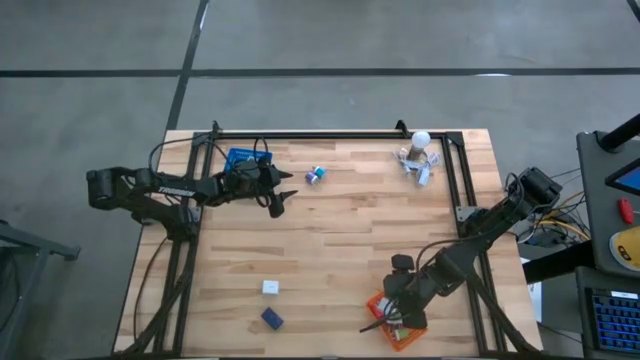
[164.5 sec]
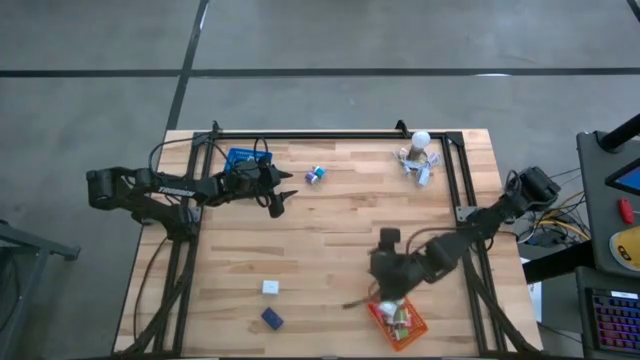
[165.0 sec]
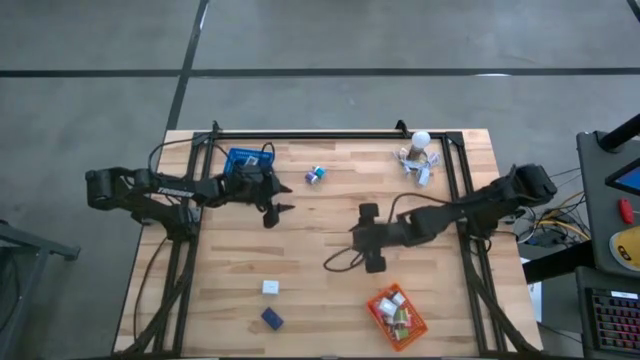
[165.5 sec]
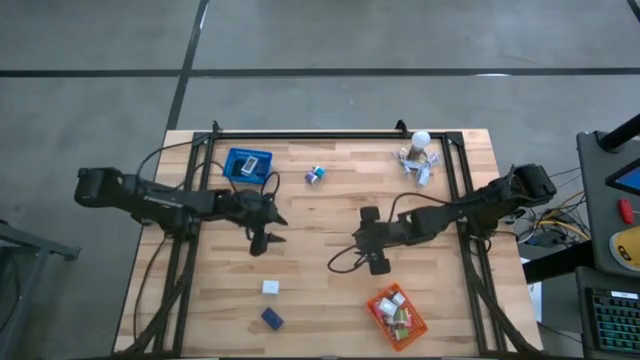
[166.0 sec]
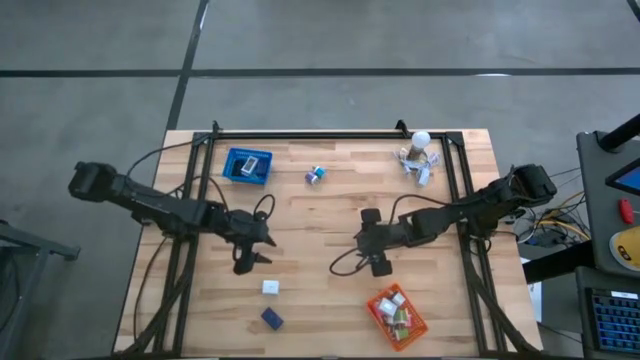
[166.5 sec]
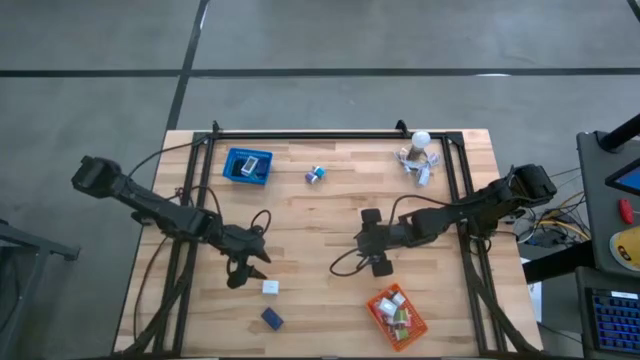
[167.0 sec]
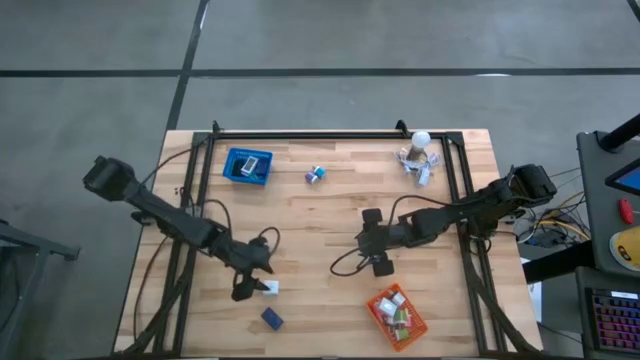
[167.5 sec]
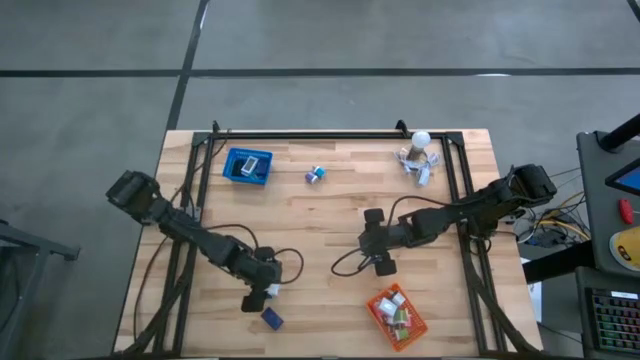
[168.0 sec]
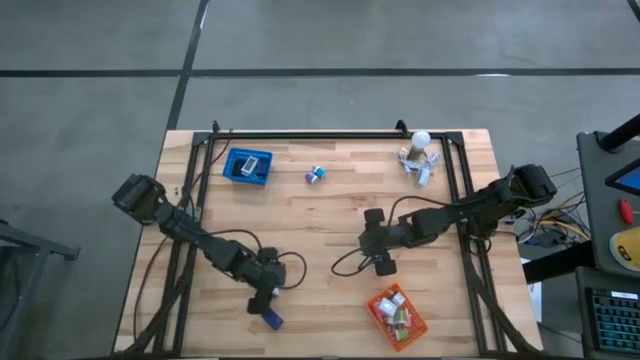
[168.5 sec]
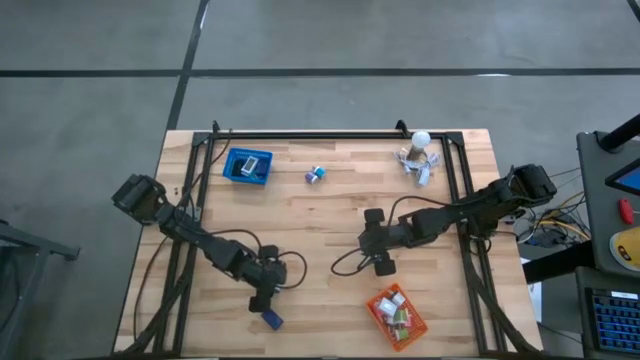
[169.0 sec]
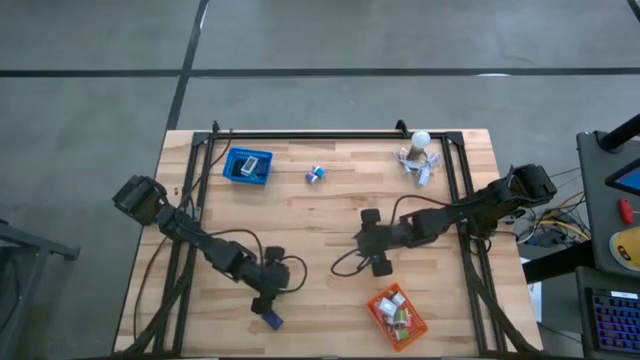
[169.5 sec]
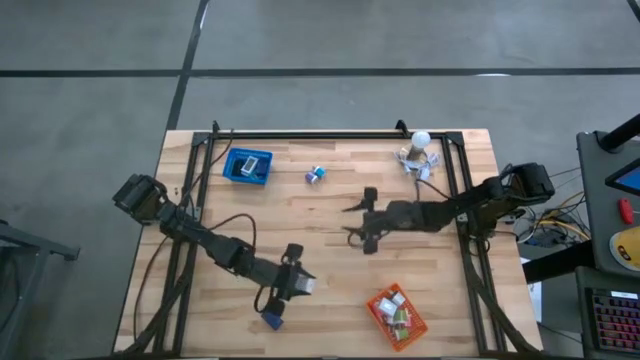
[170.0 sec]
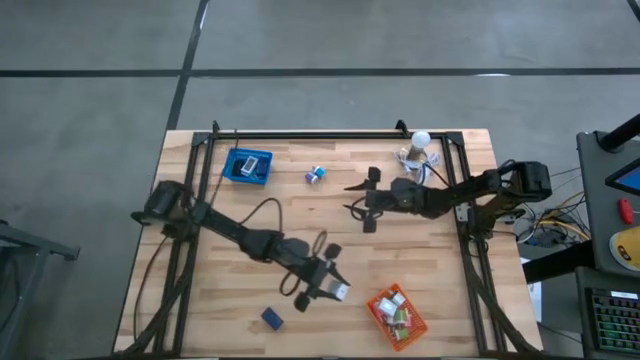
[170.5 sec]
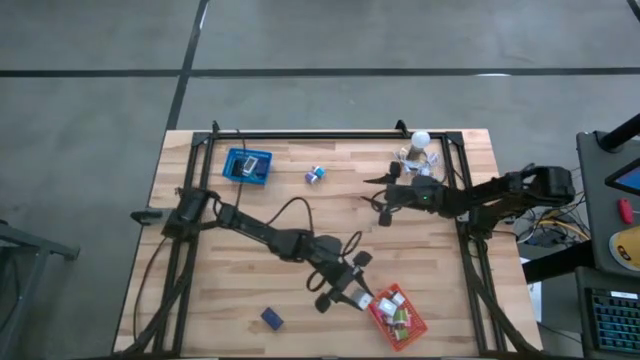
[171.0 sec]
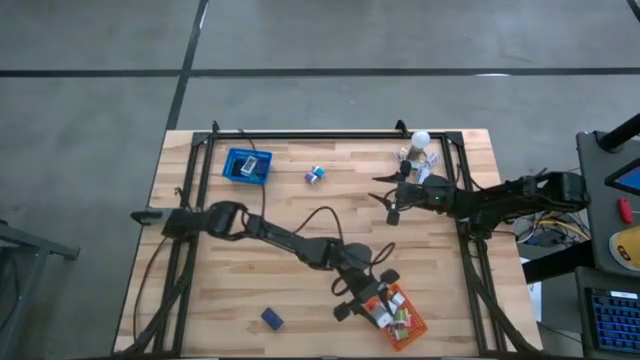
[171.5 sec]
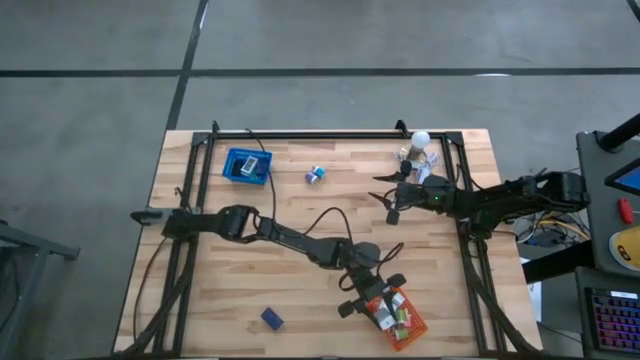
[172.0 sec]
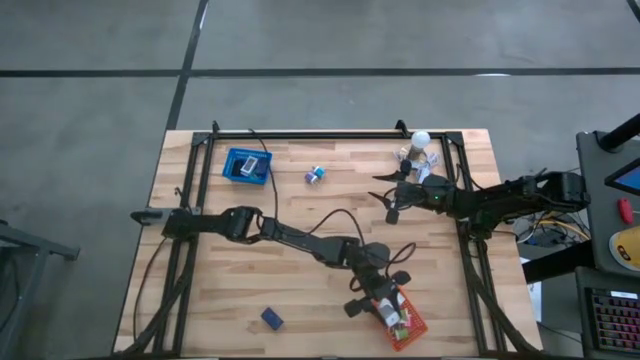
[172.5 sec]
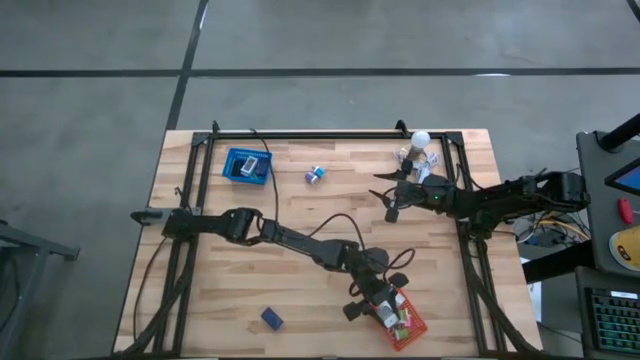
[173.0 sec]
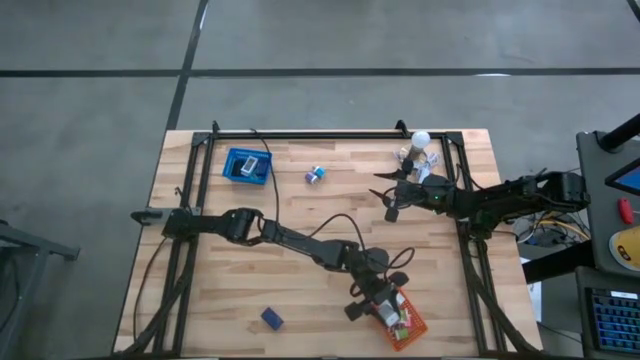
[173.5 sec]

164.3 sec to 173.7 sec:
Task: Pick & Place Office items
Put the white charger adapter into the orange bin

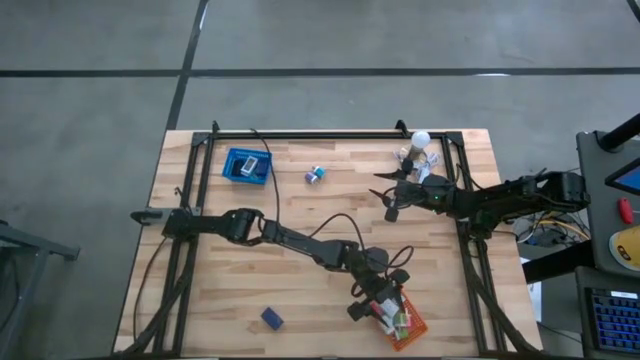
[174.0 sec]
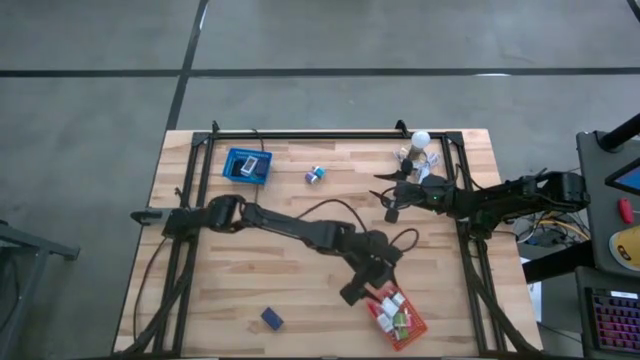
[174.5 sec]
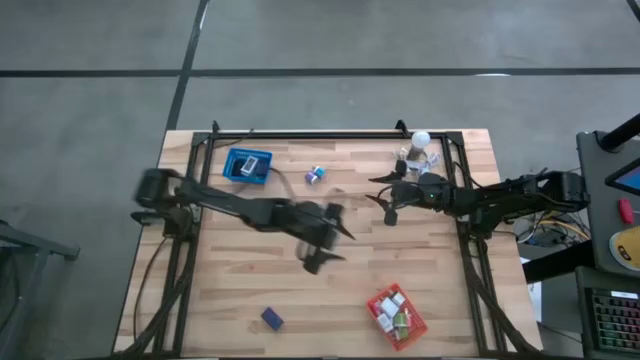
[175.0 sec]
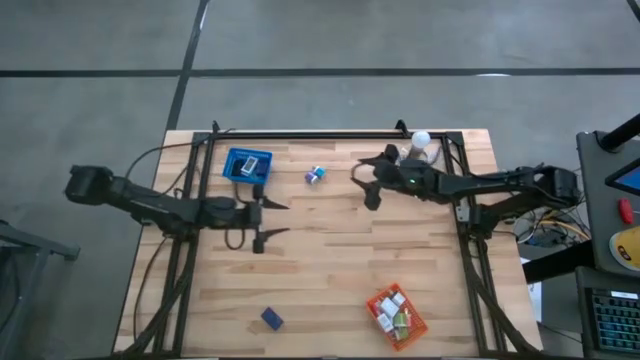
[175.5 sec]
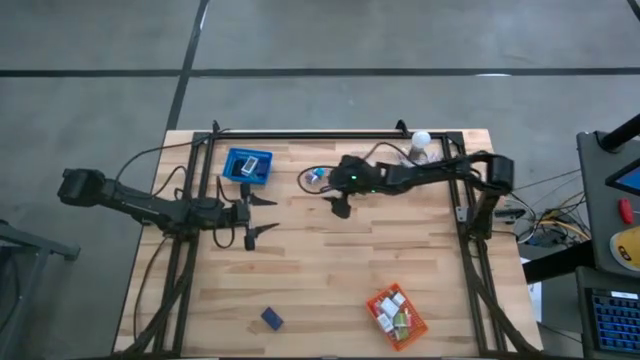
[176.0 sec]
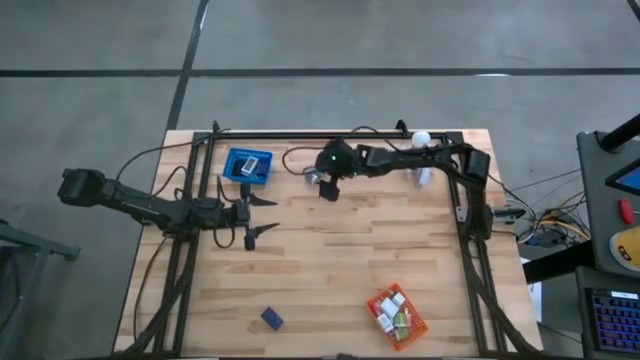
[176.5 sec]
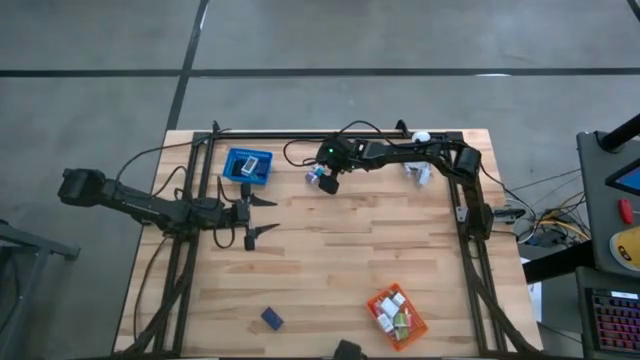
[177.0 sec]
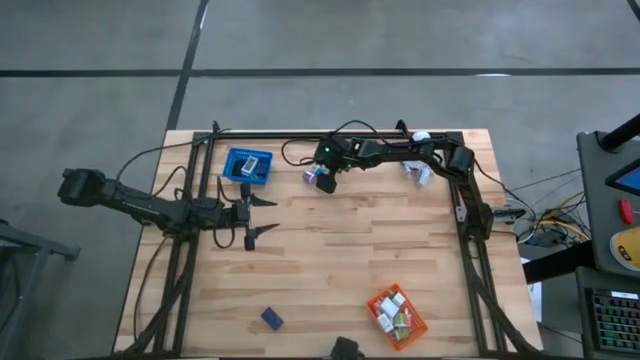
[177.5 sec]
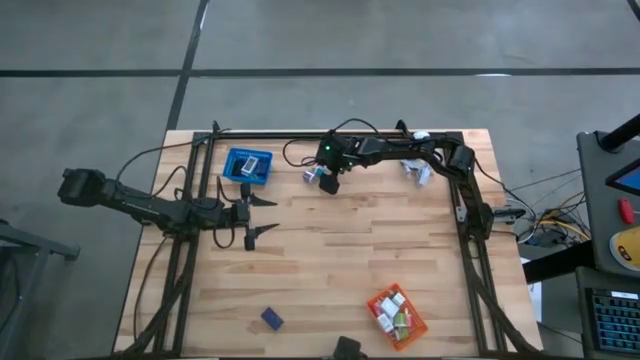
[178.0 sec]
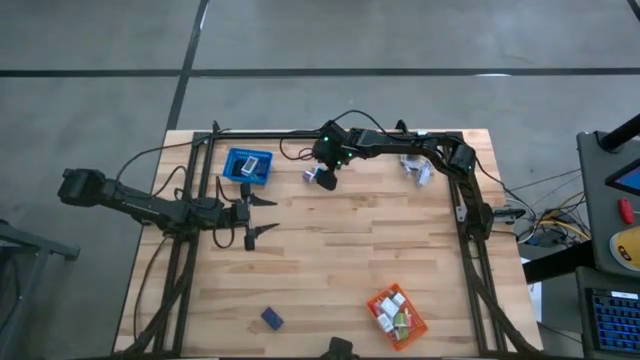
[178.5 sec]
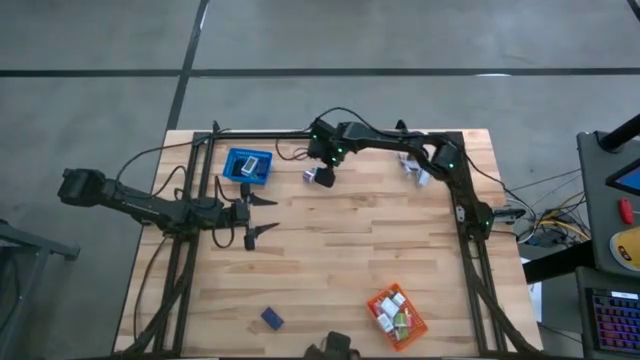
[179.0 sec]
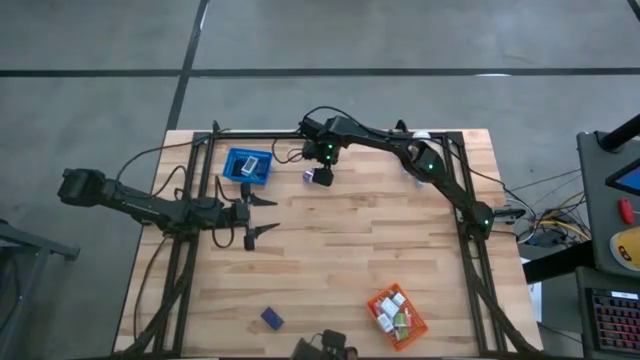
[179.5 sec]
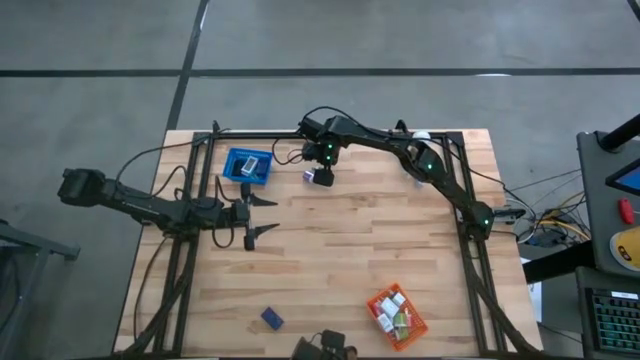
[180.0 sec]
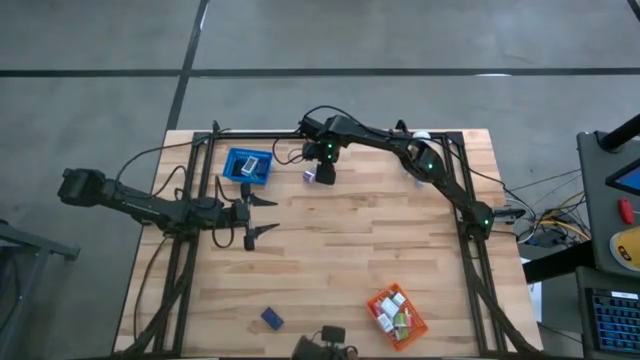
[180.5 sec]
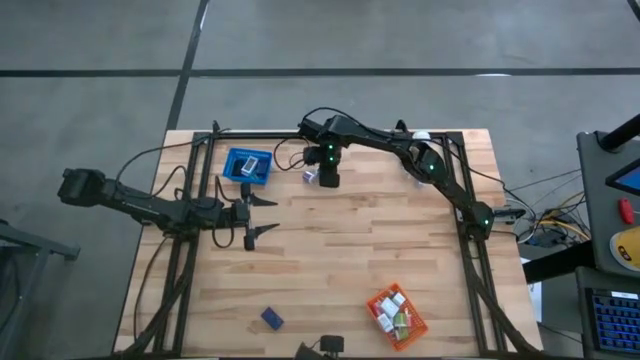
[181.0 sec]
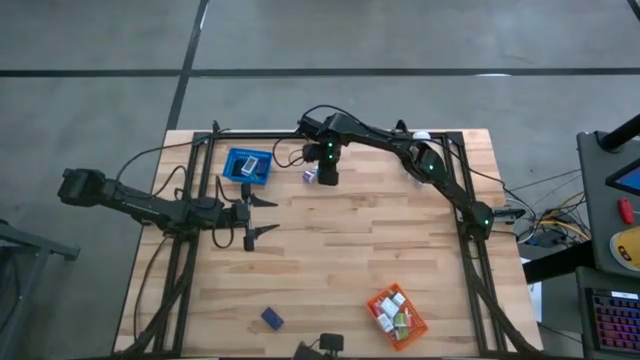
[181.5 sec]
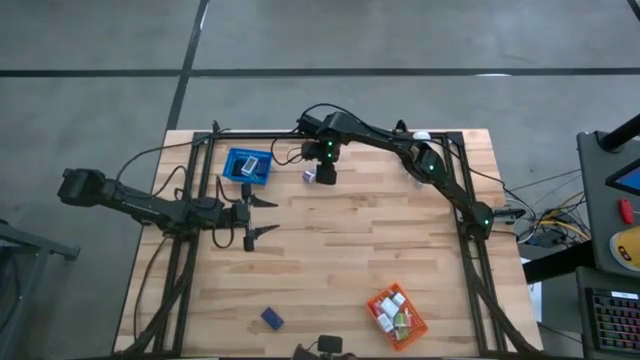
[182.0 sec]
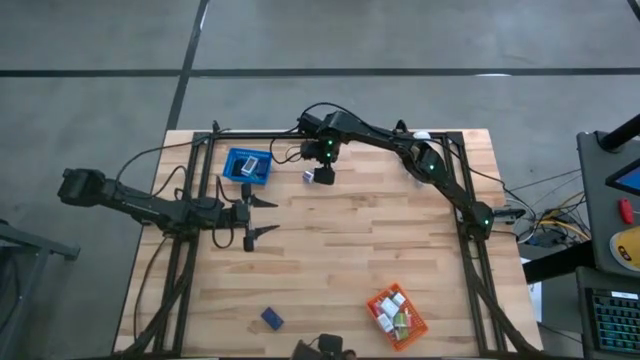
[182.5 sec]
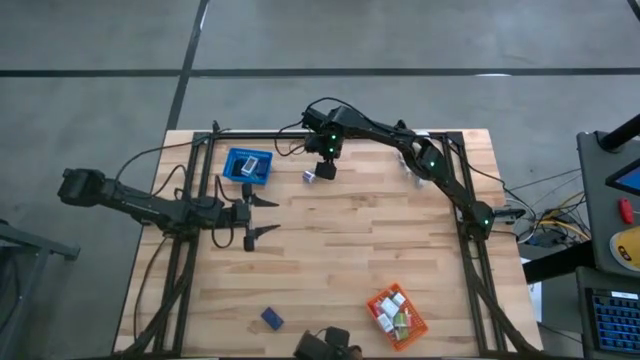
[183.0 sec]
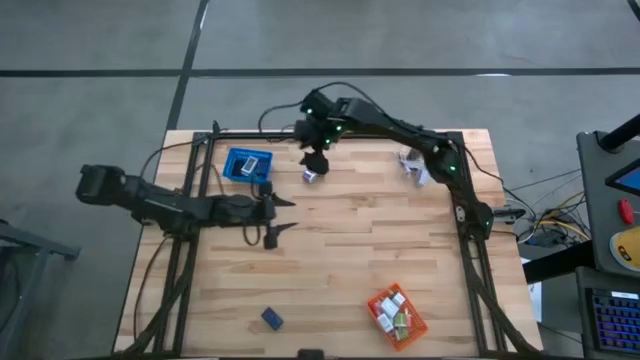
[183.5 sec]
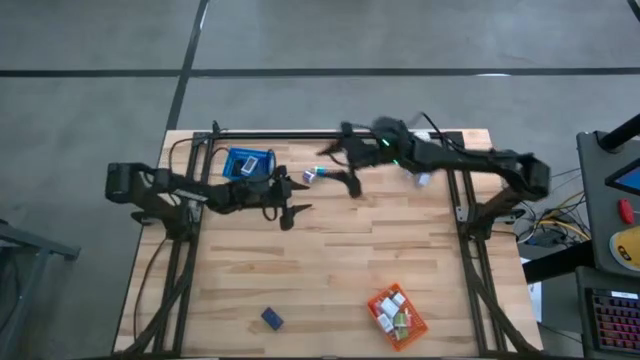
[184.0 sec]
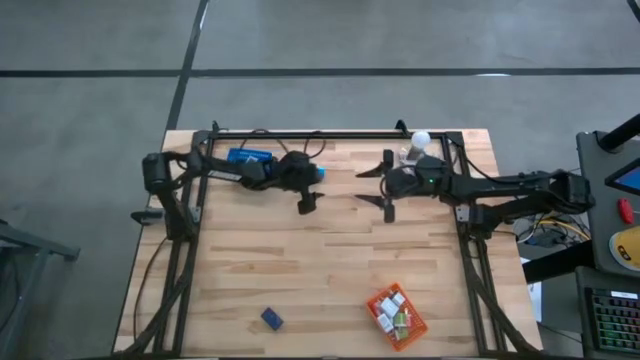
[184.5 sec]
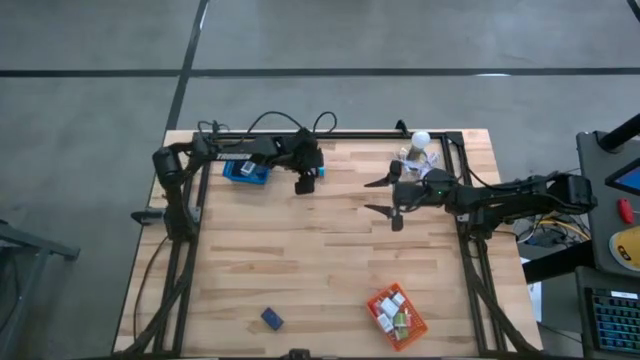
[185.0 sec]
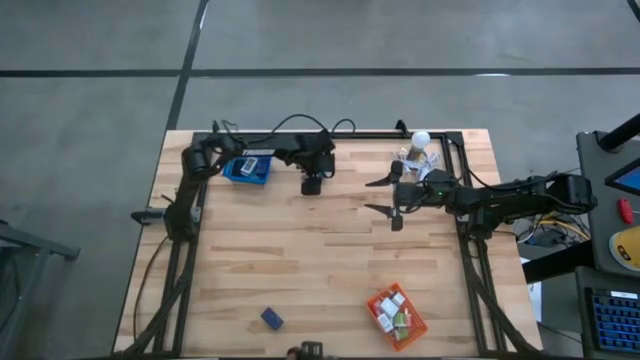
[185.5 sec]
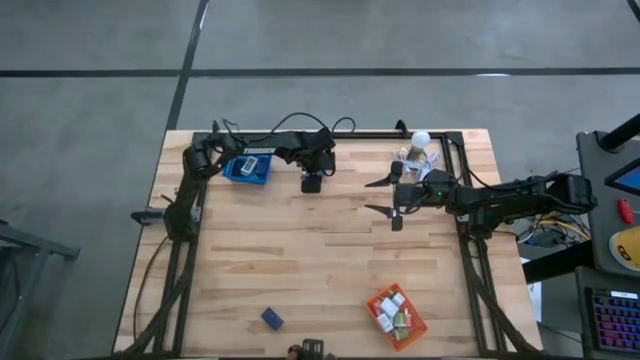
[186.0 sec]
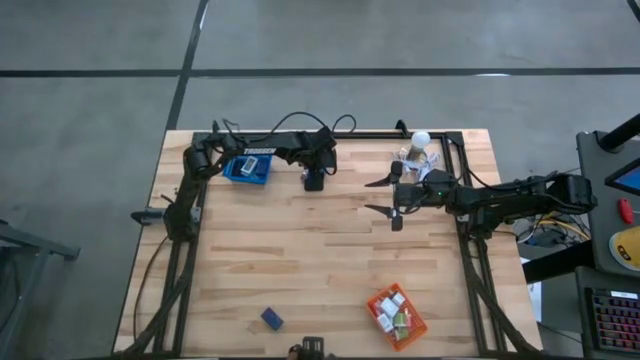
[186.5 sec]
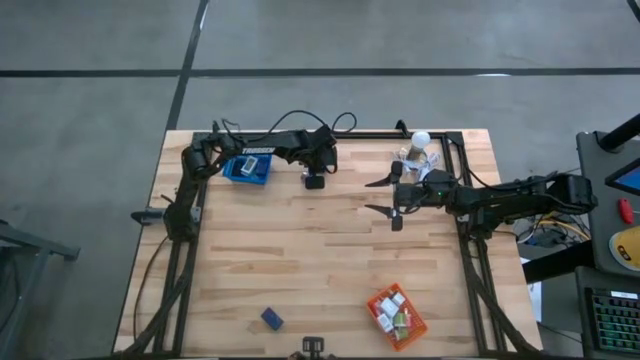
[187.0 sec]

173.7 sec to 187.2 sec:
Put the blue charger adapter into the orange bin
